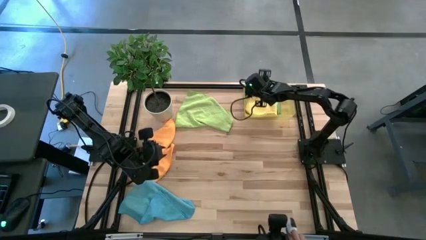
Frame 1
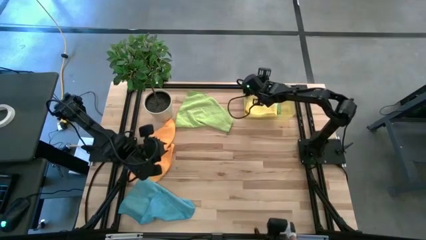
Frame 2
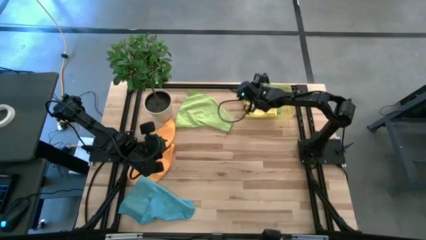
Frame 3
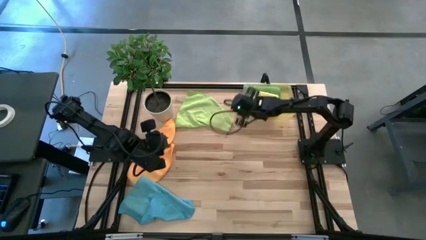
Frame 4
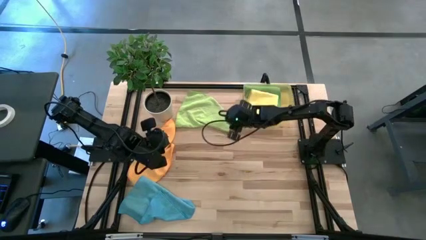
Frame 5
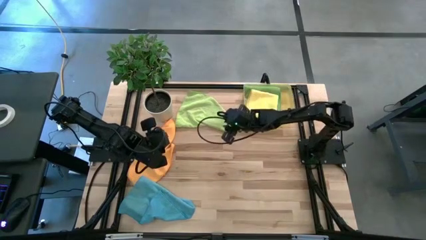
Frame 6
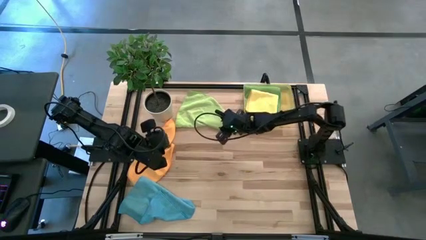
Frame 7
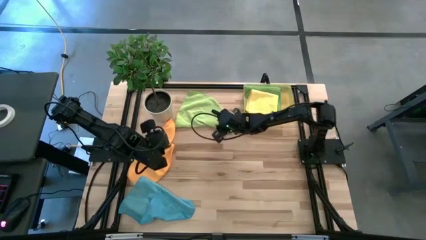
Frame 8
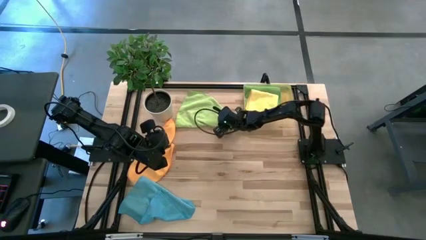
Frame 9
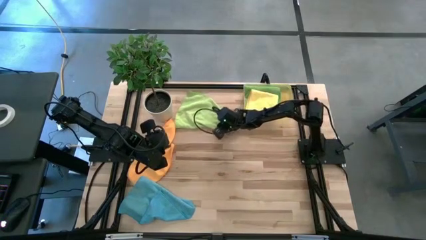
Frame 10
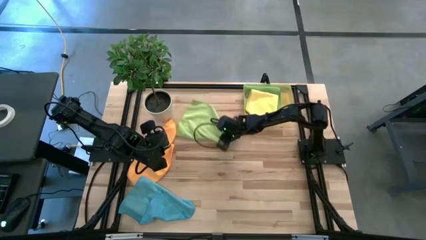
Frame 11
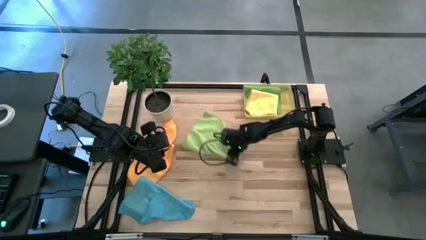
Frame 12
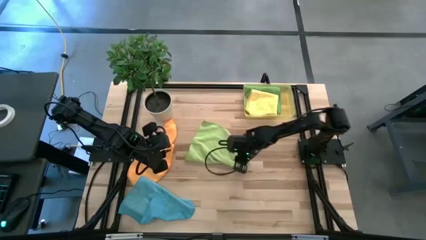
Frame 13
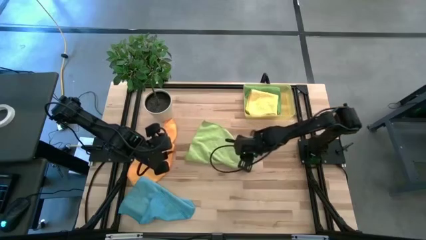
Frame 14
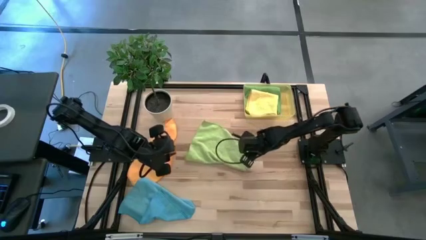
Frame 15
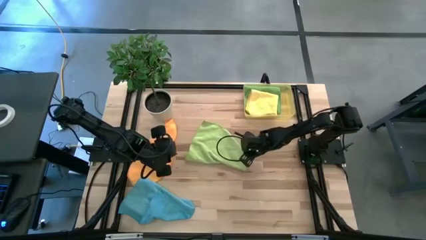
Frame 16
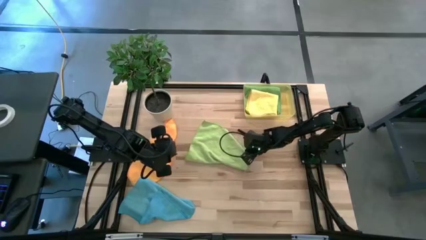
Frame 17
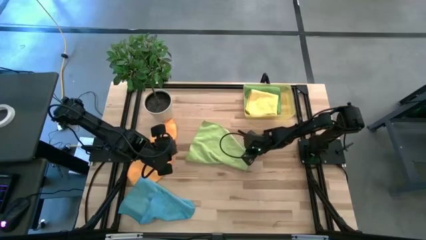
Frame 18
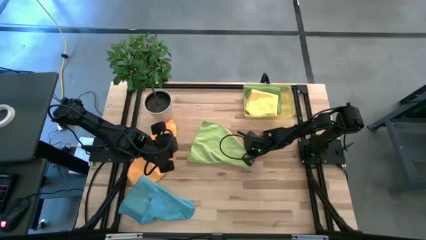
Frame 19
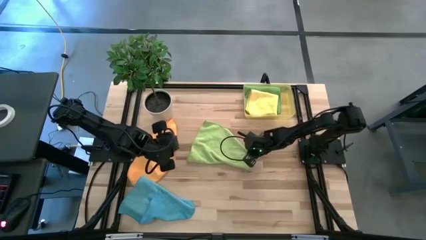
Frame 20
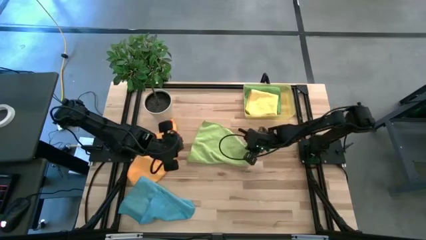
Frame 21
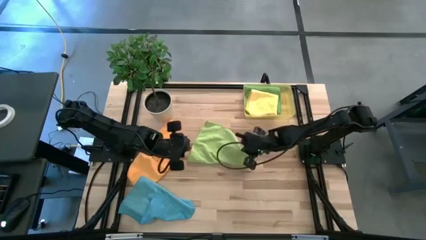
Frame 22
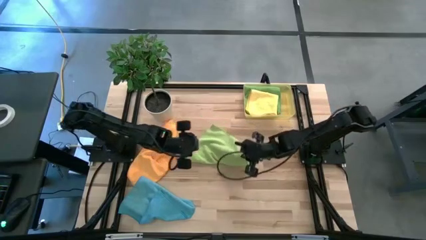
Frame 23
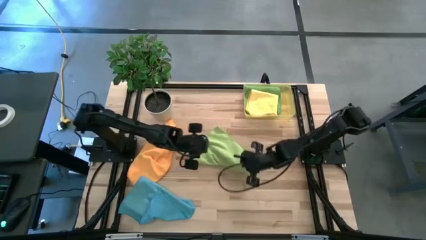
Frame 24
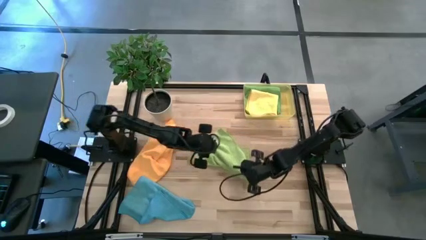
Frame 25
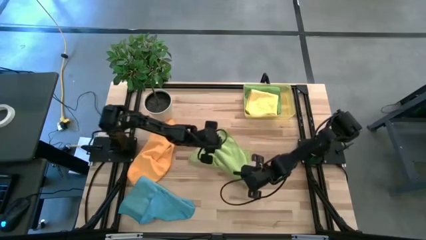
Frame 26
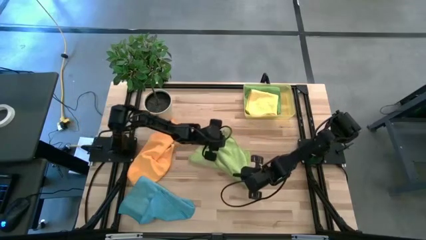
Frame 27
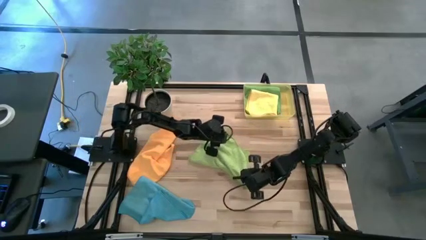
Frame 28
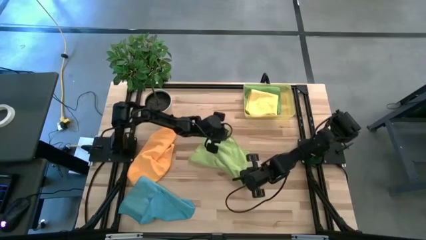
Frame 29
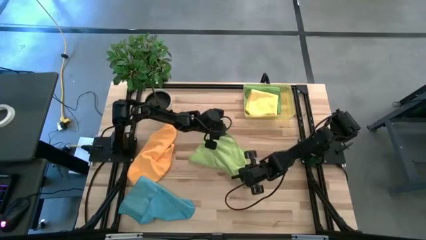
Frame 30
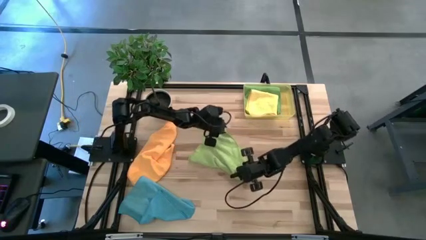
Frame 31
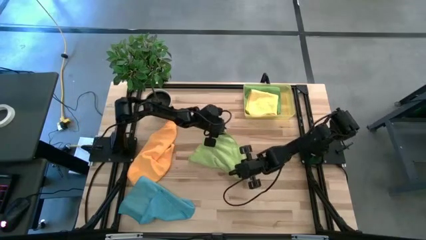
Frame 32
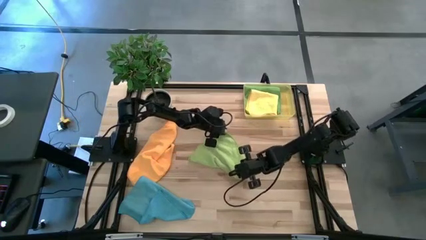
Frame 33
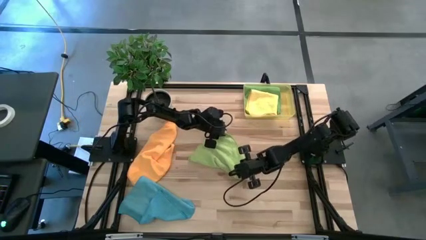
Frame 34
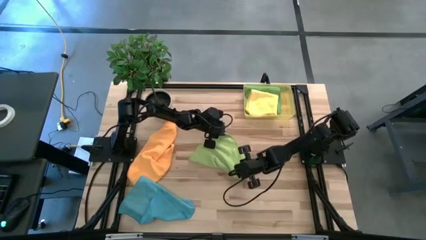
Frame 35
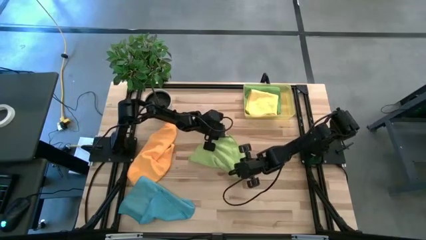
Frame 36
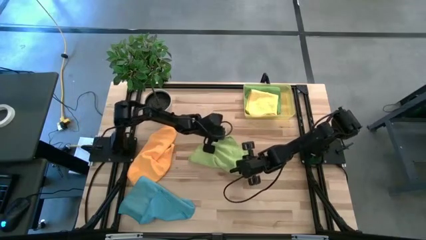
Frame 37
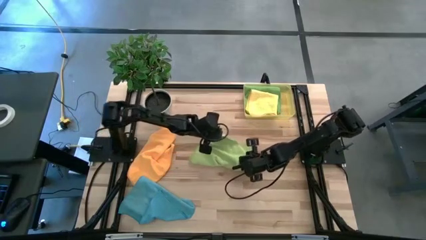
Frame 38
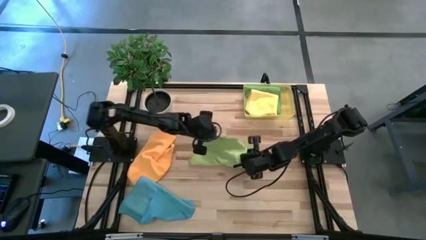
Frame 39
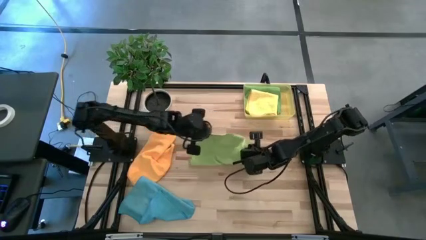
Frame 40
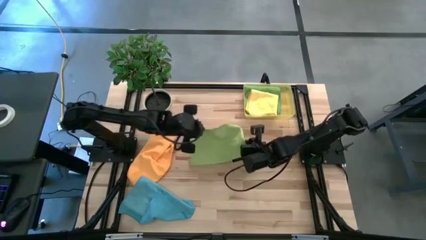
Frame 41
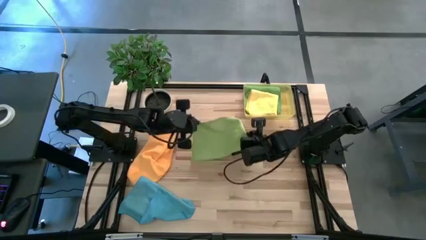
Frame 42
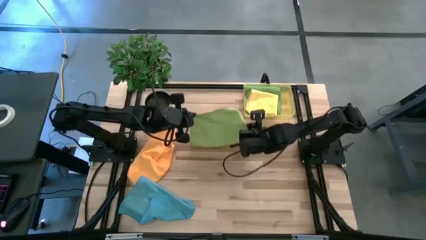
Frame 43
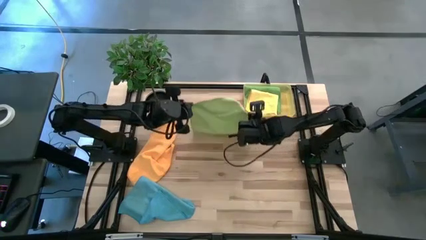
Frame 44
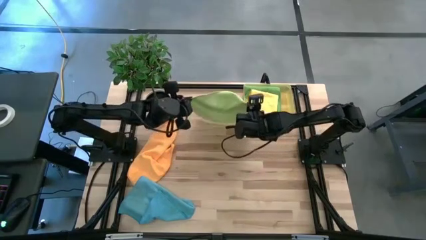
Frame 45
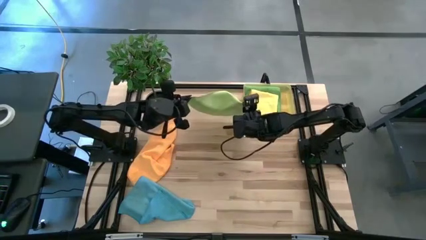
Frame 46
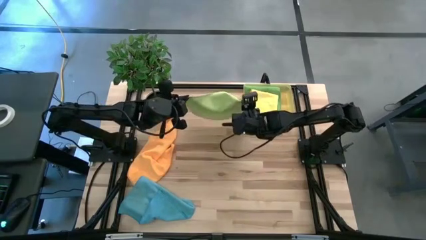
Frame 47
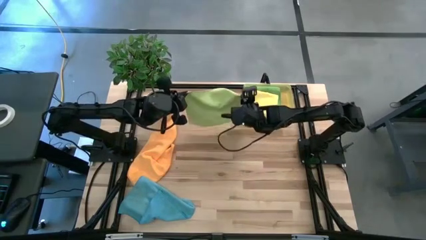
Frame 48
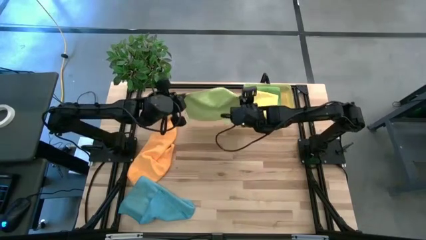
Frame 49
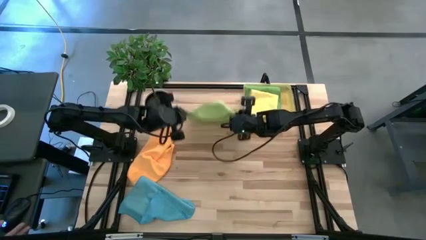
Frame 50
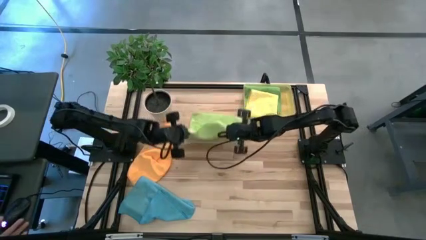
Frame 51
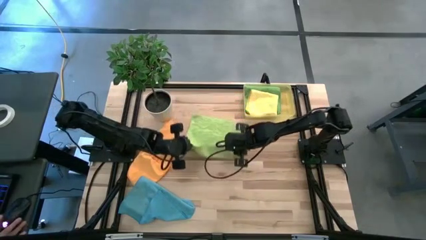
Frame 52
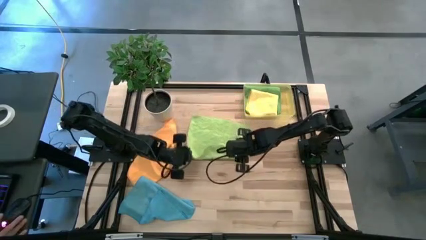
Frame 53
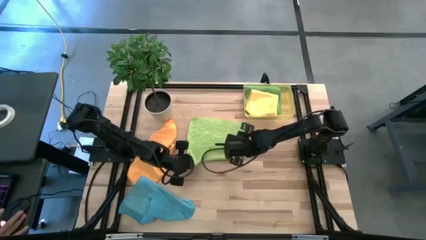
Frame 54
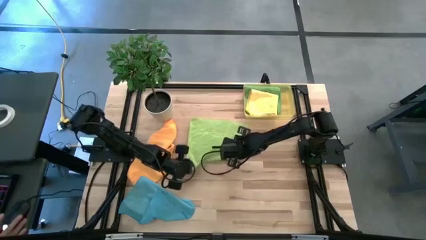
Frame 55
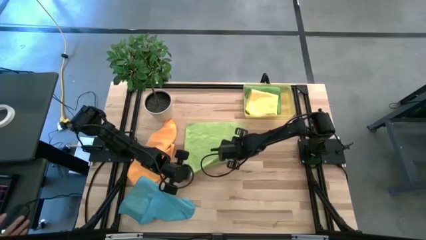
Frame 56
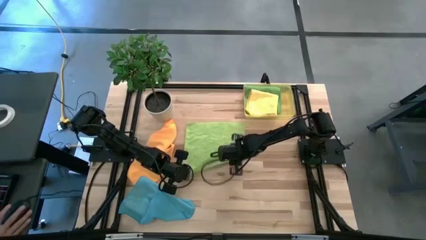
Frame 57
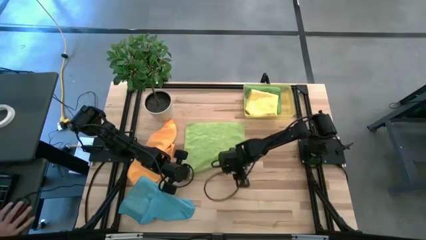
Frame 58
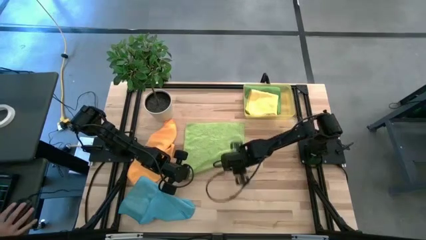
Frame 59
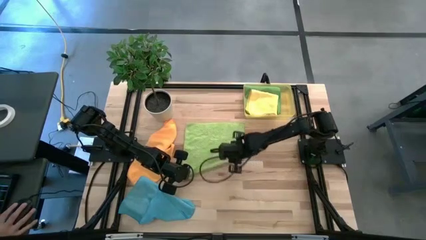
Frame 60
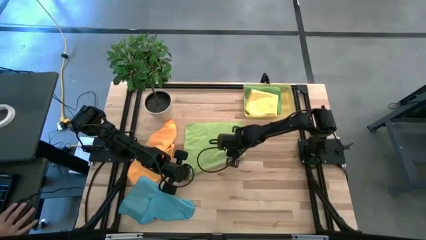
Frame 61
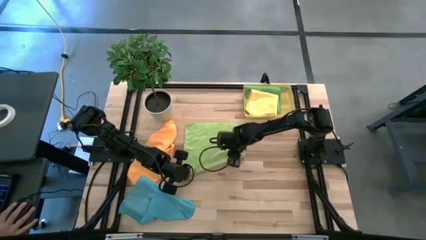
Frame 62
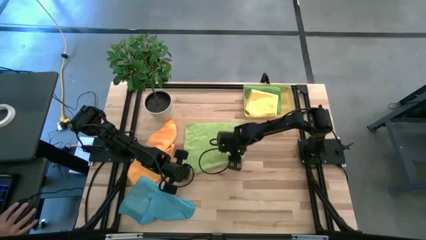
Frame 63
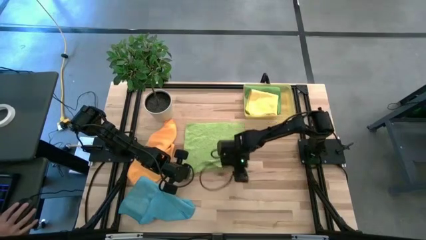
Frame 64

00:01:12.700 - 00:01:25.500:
Task: Fold microfiber towels
Fold the light green microfiber towel
